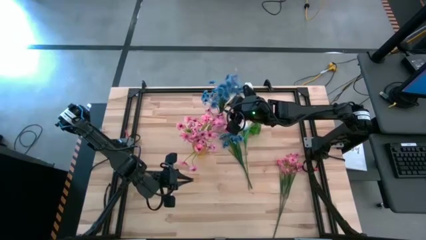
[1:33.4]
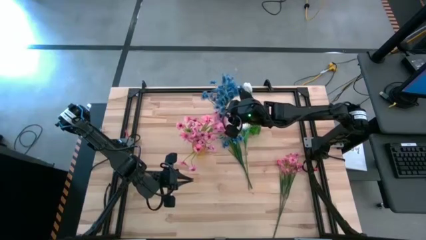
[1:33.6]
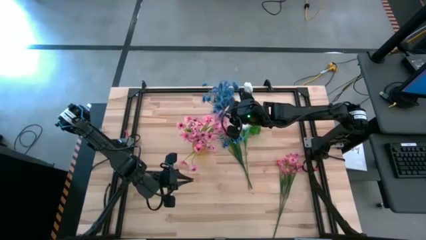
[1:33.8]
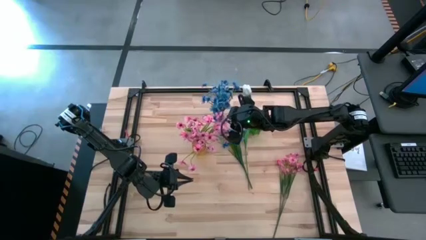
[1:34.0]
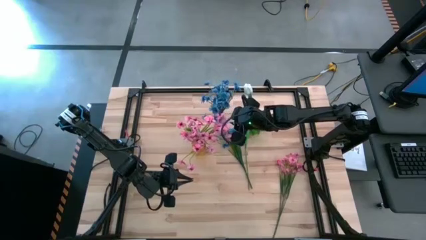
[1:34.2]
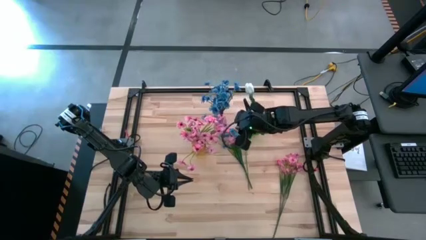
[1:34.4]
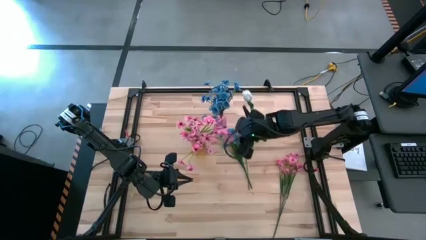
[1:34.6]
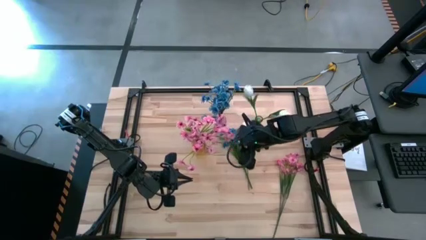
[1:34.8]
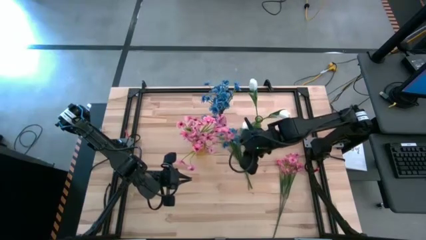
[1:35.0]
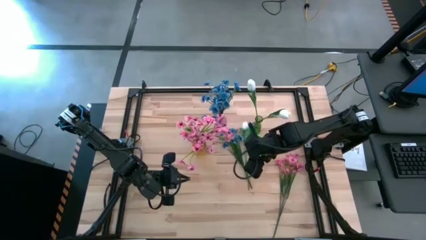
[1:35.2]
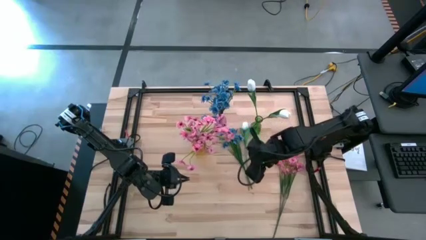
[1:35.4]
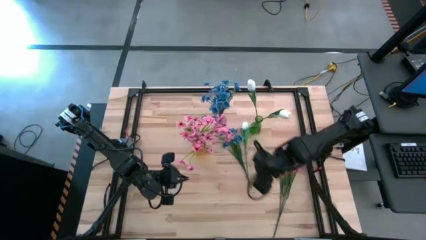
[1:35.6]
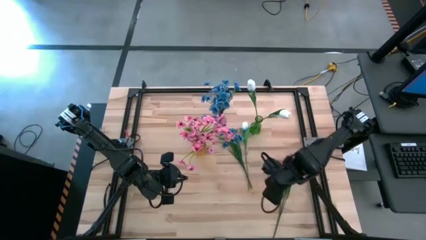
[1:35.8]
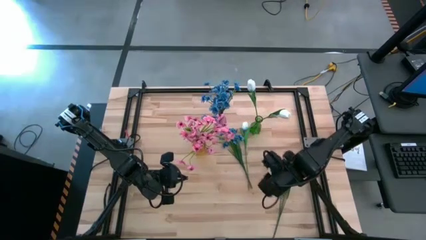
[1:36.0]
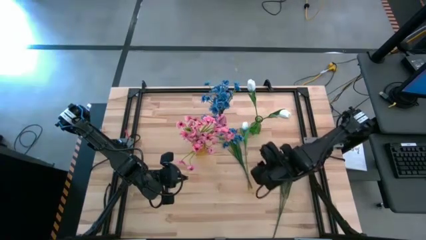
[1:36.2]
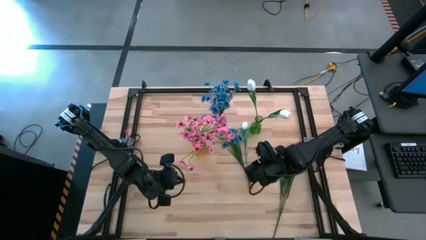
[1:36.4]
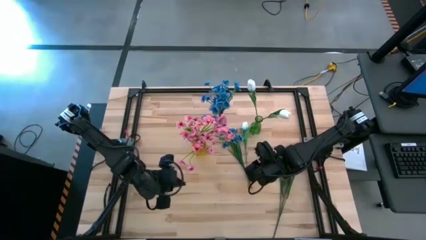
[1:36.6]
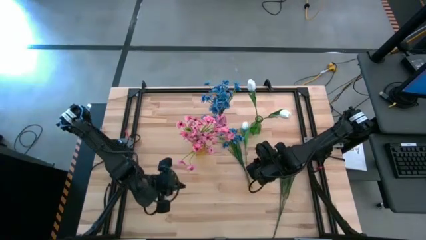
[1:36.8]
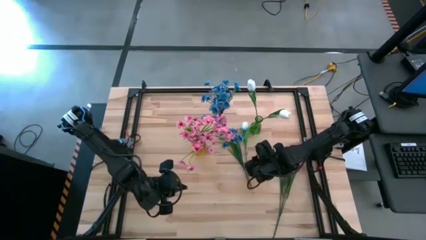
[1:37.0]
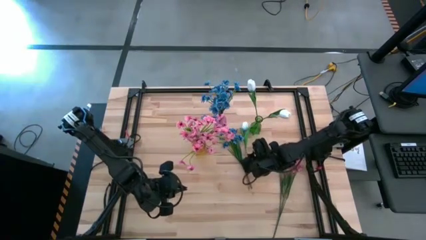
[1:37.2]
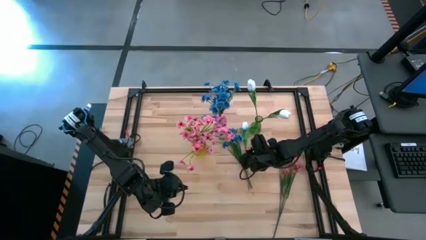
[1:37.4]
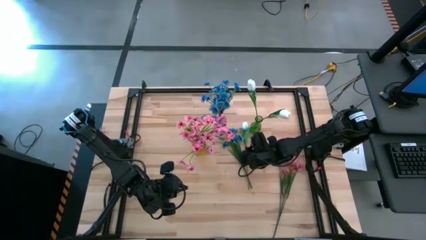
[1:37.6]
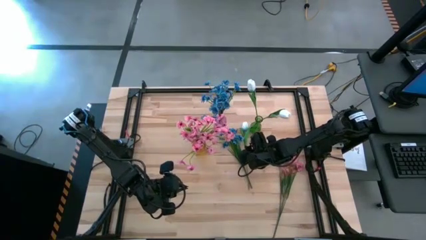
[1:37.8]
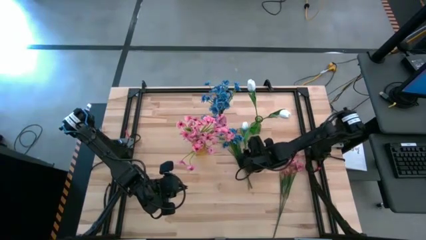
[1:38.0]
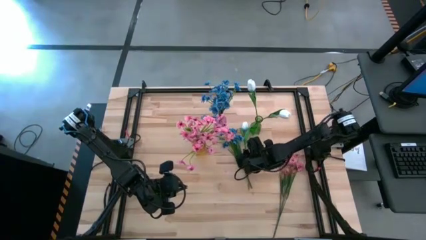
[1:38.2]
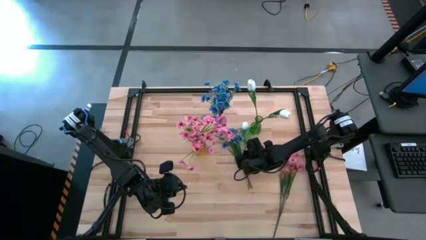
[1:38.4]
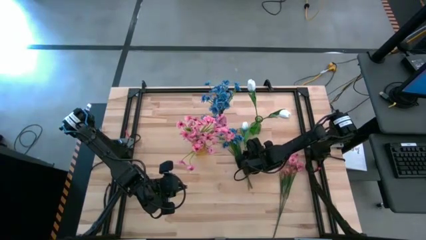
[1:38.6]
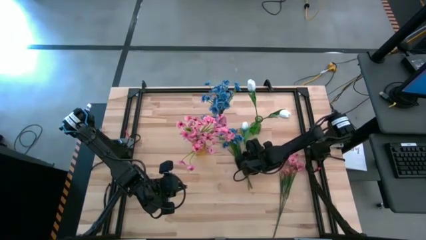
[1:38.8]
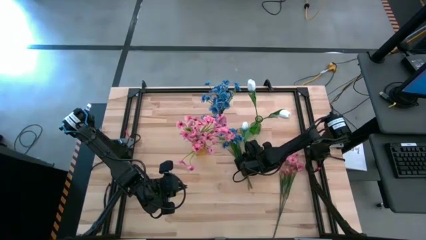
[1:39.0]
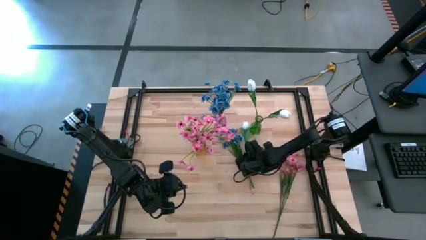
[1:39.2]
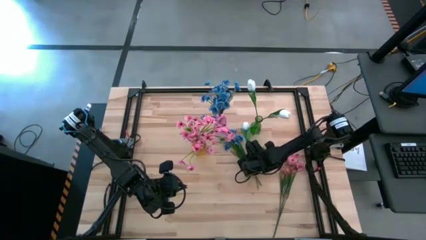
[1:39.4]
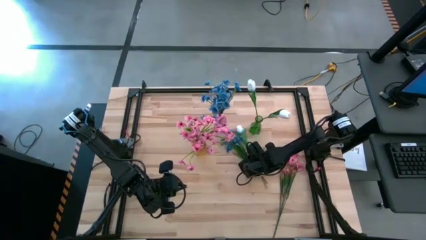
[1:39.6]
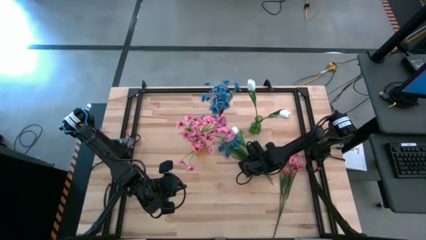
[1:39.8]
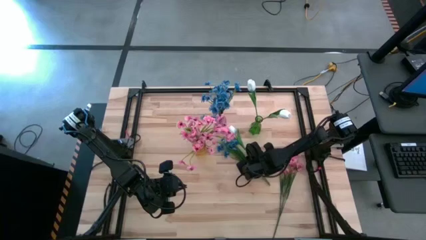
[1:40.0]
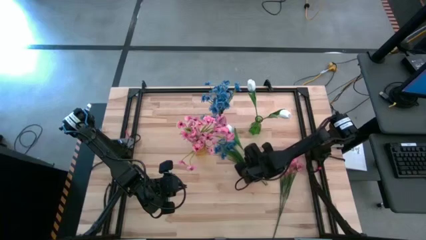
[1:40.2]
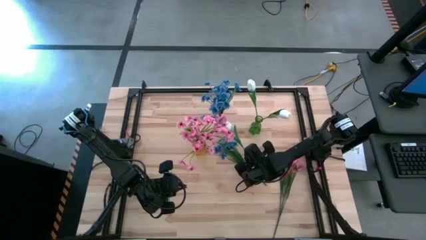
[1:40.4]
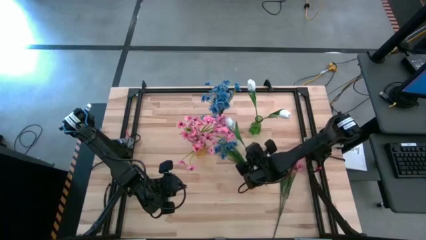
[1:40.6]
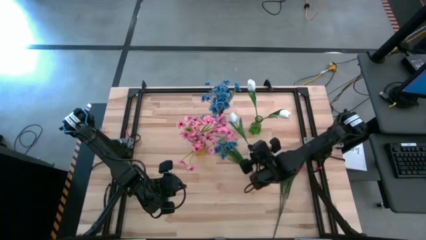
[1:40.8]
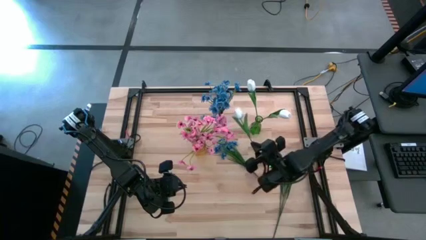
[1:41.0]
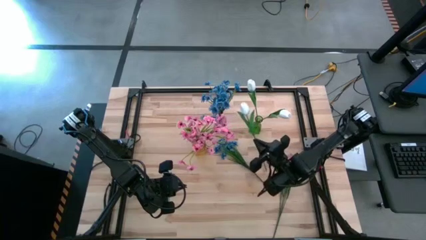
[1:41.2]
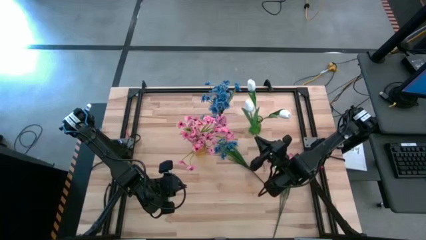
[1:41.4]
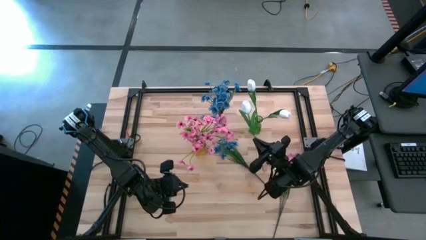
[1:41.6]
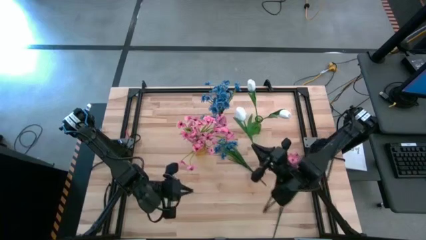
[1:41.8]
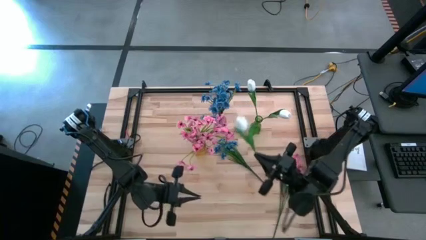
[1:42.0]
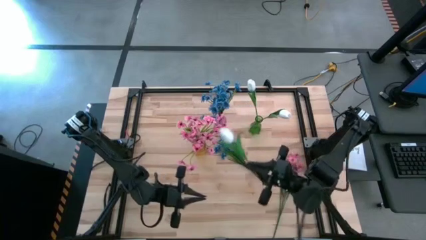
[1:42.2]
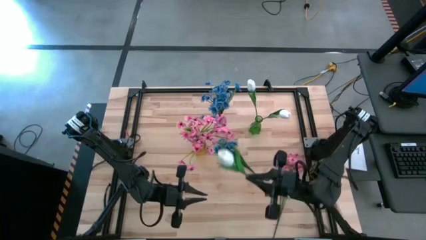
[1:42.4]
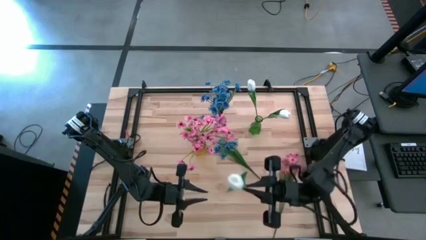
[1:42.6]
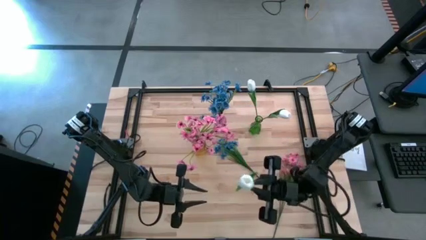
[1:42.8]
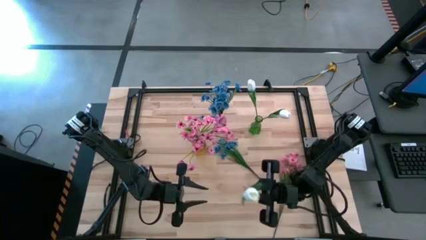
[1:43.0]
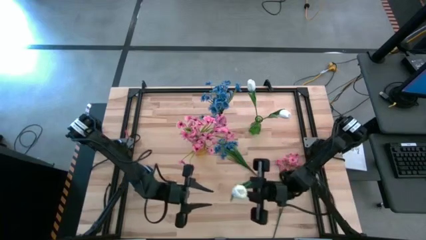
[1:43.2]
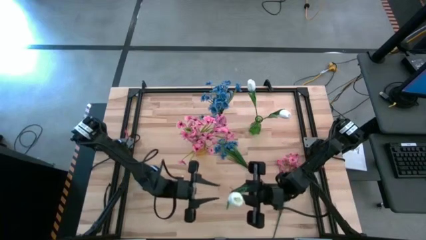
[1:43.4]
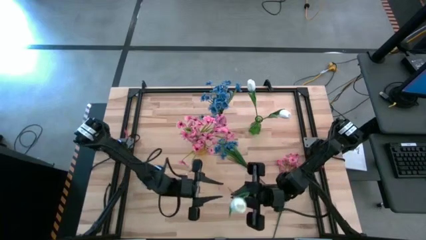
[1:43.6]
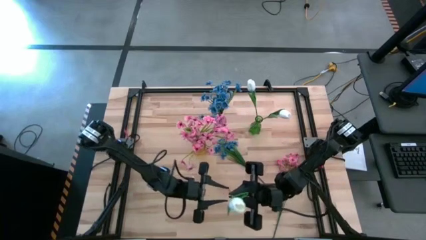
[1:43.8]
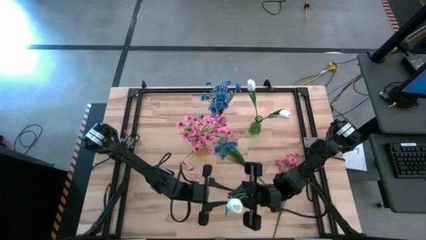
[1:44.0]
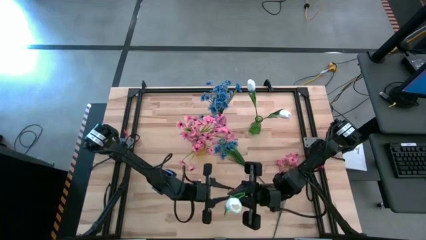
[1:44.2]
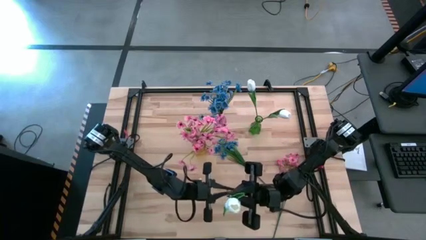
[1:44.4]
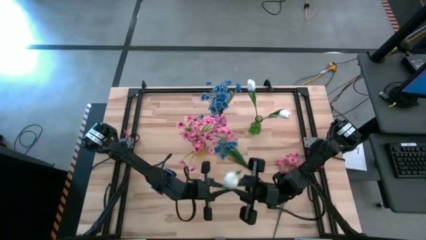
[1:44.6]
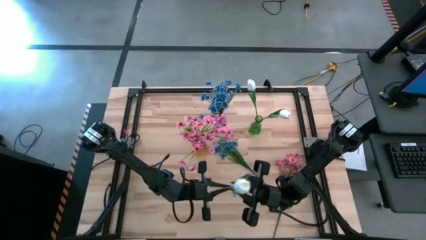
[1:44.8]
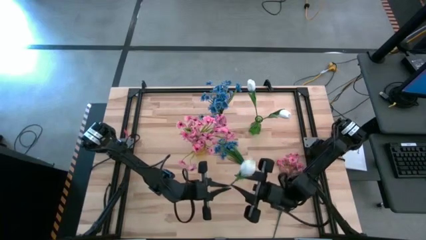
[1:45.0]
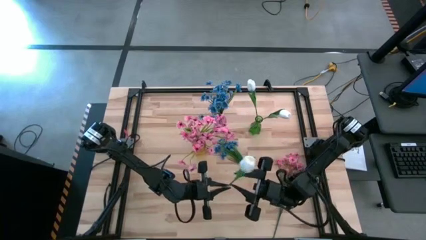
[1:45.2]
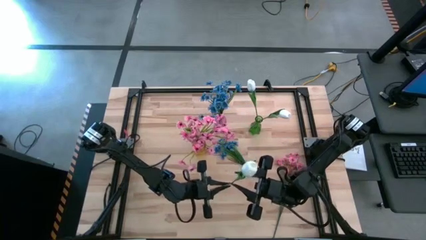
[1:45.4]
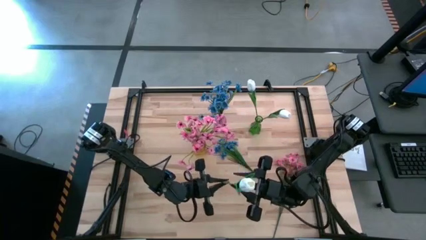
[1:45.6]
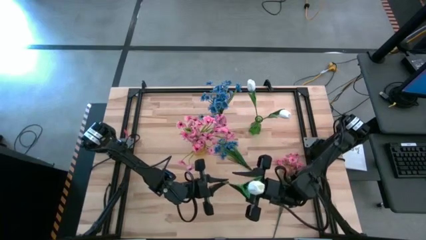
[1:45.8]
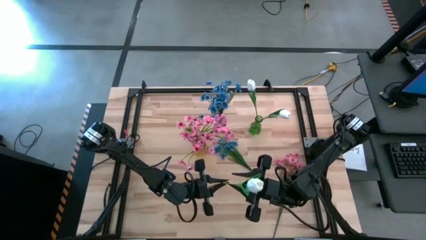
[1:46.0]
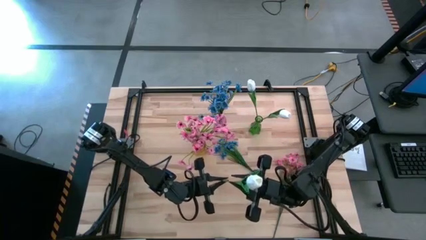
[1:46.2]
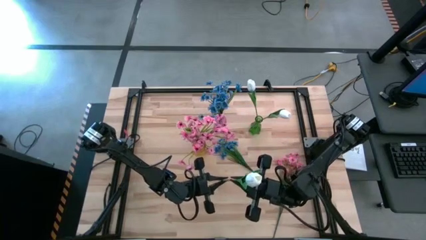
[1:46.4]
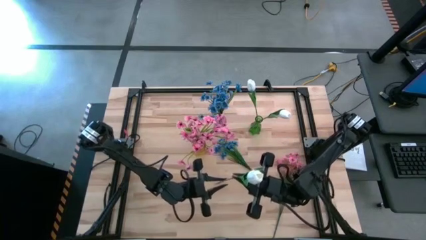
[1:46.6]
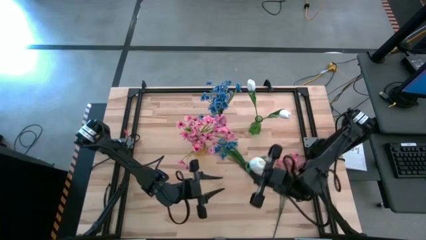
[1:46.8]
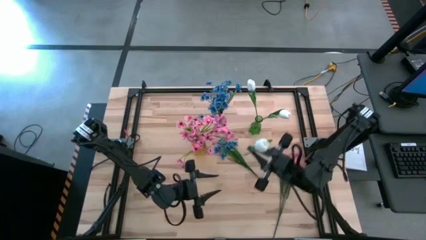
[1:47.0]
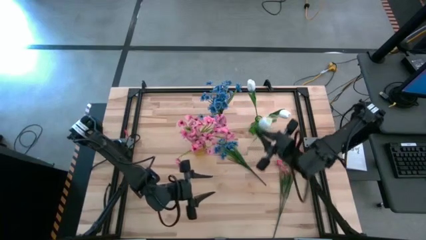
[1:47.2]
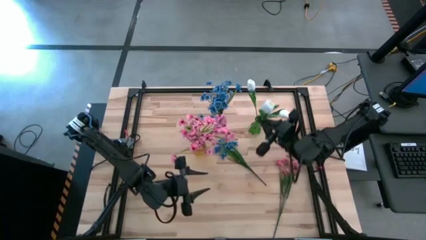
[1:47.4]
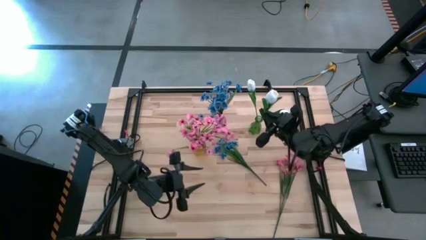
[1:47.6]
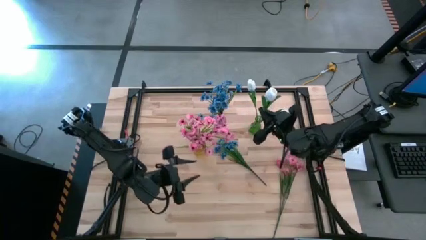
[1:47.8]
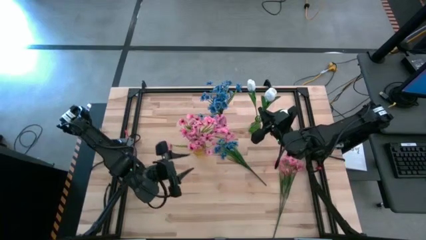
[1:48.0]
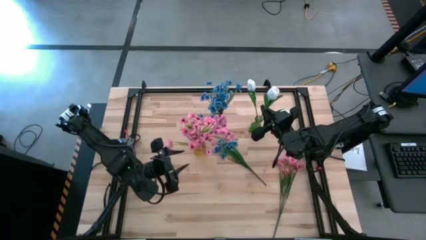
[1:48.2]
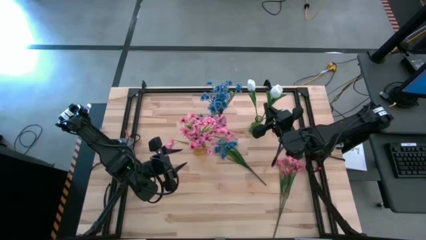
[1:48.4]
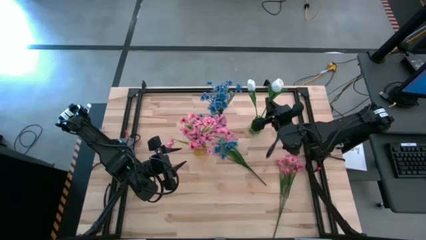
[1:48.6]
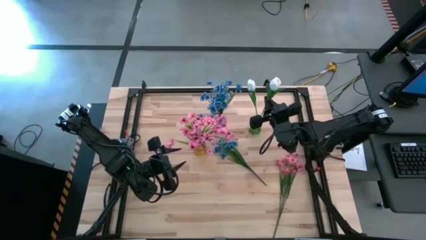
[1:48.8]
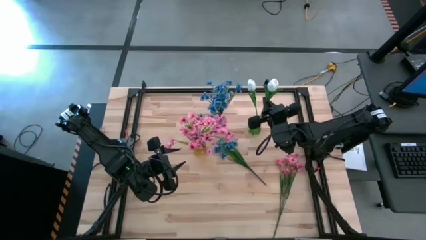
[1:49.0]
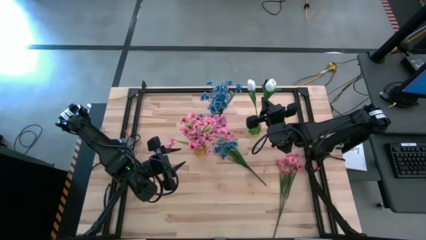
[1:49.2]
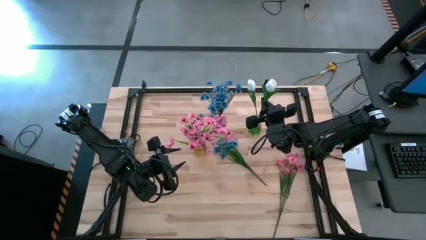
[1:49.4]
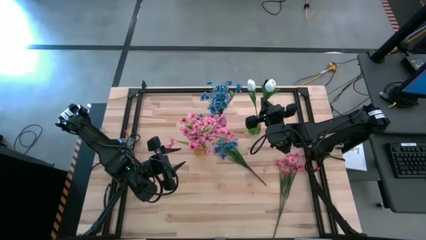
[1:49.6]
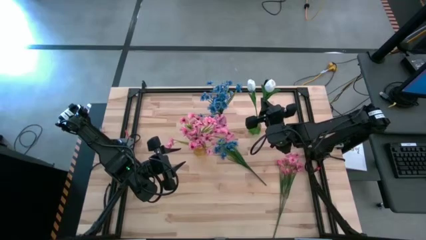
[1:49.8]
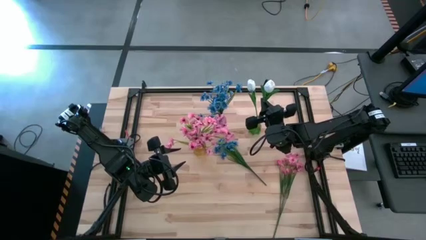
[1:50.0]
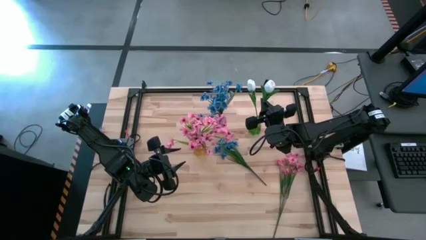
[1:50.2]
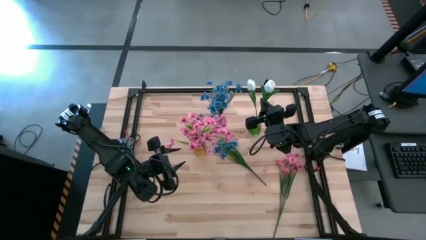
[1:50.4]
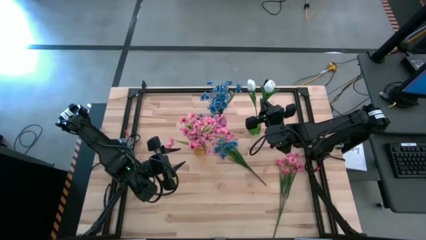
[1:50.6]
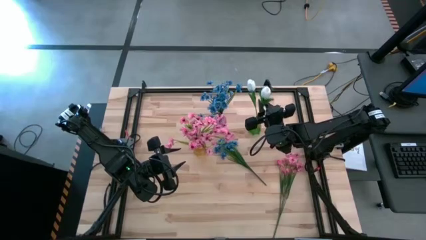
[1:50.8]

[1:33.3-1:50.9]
Task: Sort flowers into vase by color
Put the white flower into the green flower vase
